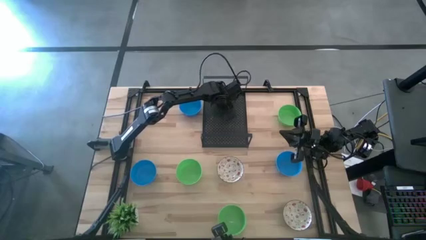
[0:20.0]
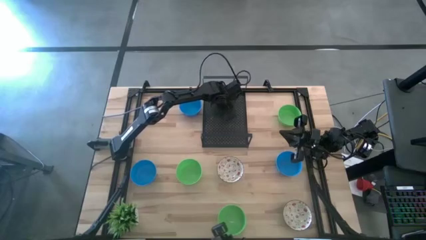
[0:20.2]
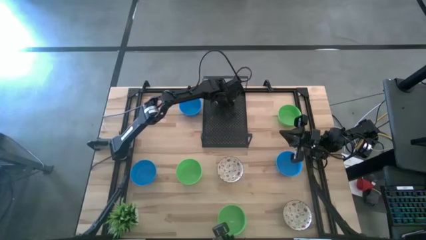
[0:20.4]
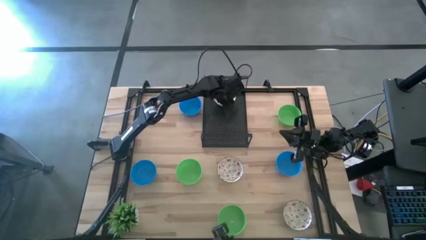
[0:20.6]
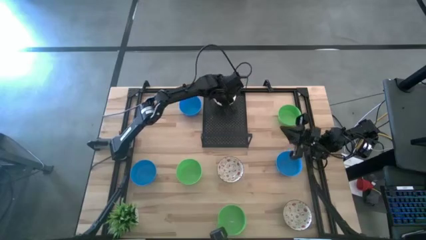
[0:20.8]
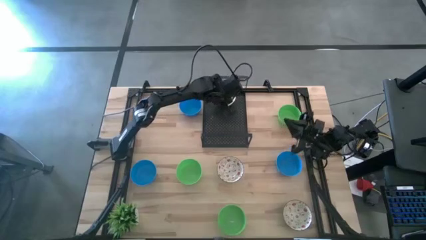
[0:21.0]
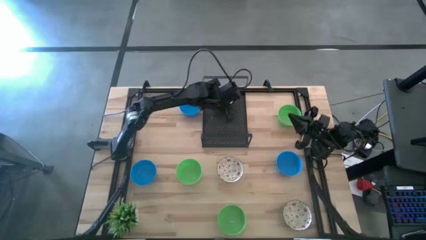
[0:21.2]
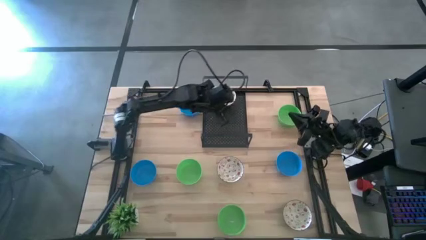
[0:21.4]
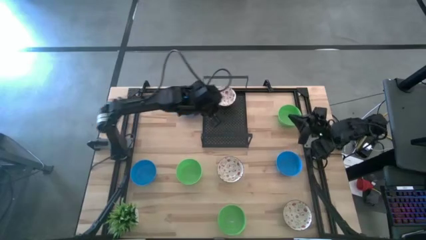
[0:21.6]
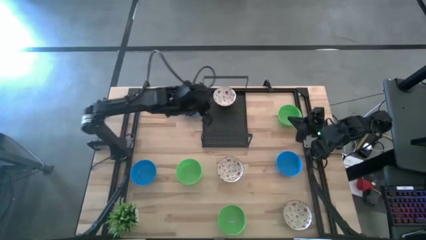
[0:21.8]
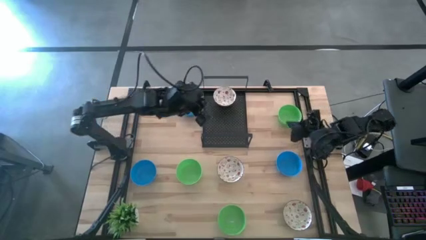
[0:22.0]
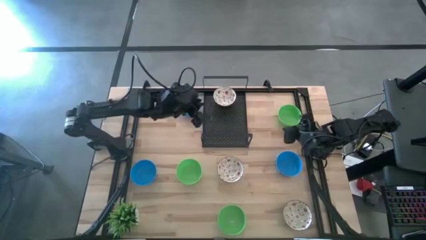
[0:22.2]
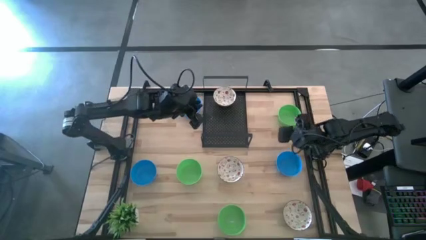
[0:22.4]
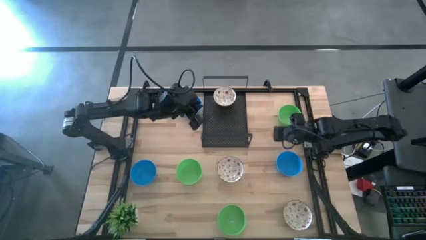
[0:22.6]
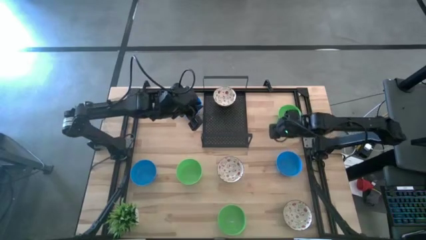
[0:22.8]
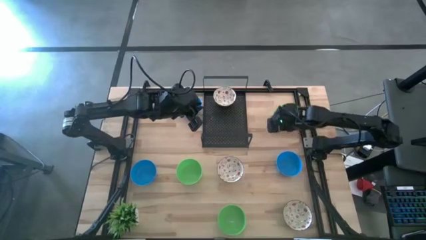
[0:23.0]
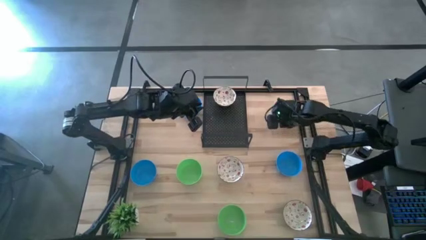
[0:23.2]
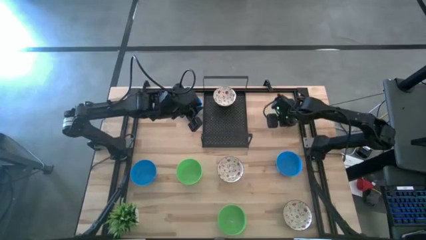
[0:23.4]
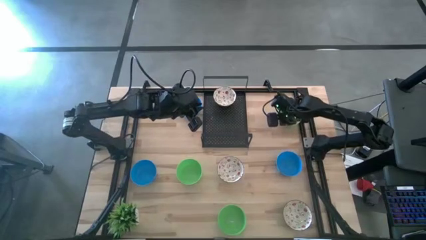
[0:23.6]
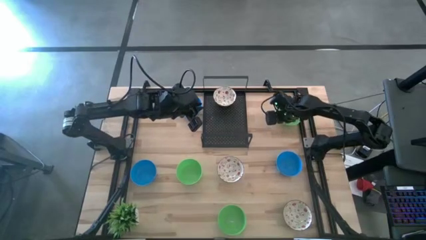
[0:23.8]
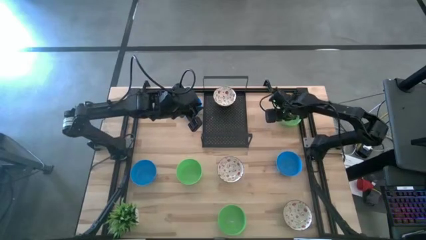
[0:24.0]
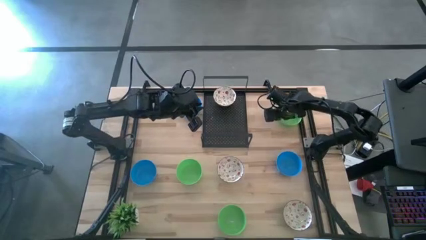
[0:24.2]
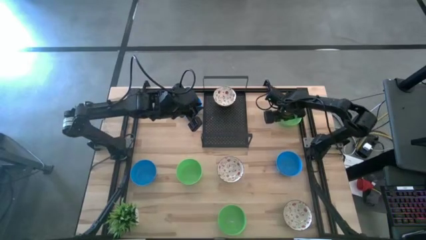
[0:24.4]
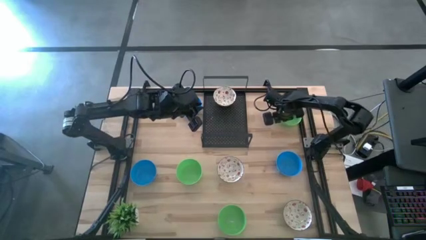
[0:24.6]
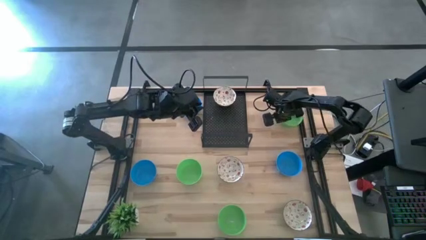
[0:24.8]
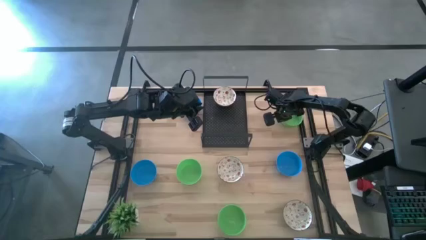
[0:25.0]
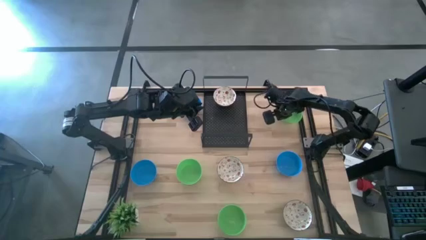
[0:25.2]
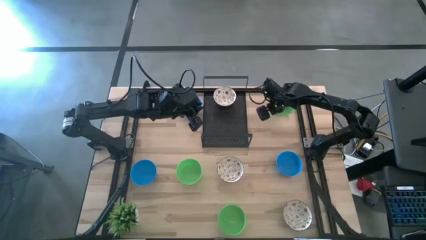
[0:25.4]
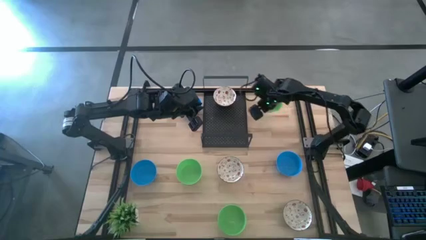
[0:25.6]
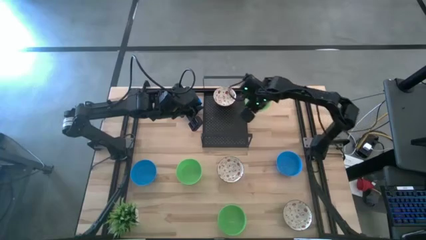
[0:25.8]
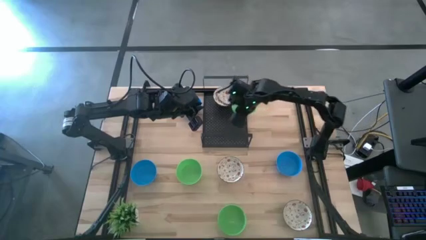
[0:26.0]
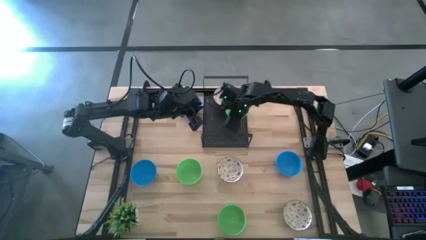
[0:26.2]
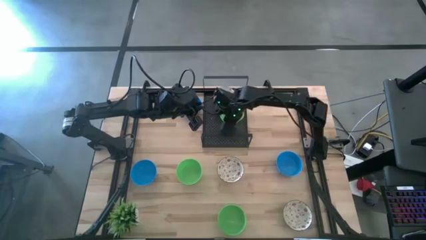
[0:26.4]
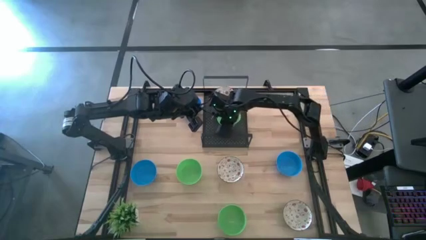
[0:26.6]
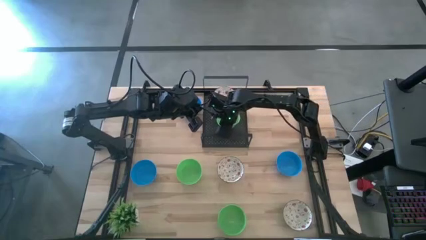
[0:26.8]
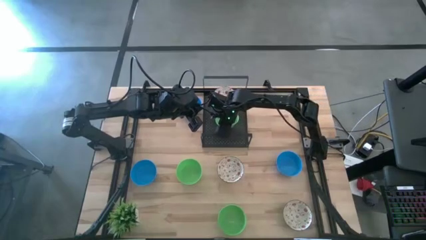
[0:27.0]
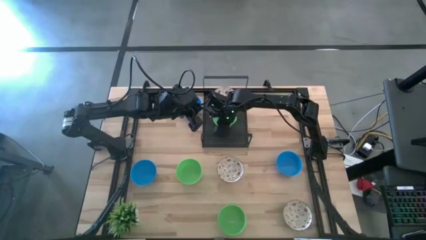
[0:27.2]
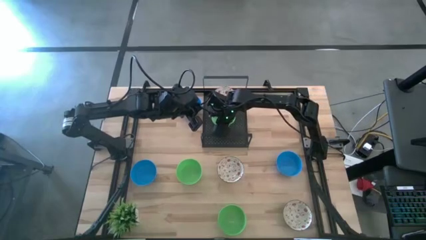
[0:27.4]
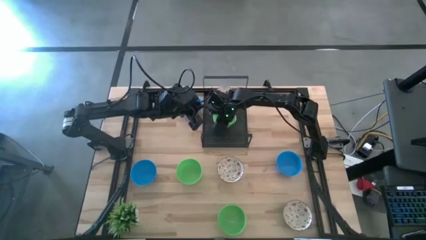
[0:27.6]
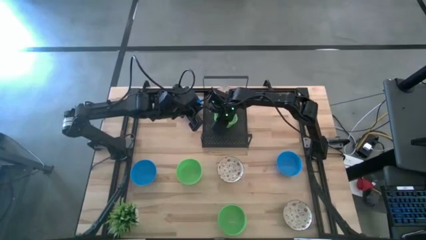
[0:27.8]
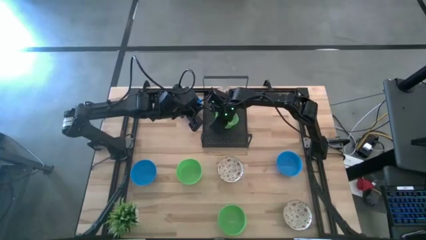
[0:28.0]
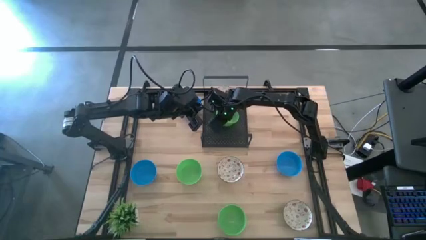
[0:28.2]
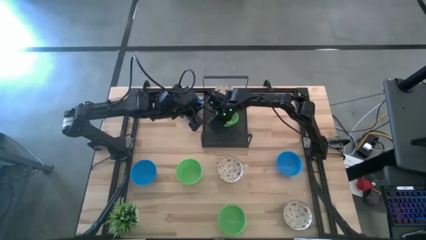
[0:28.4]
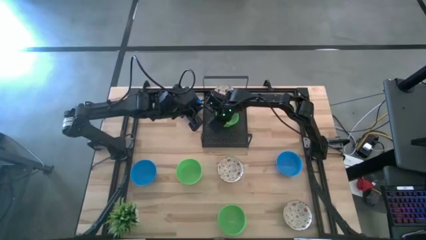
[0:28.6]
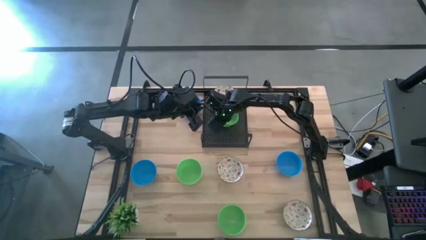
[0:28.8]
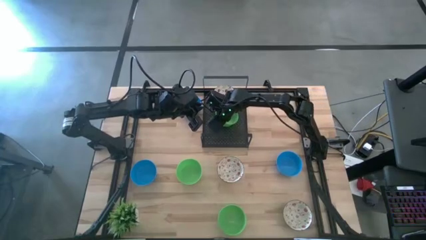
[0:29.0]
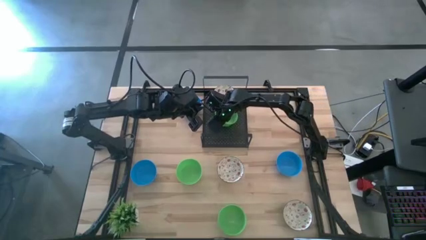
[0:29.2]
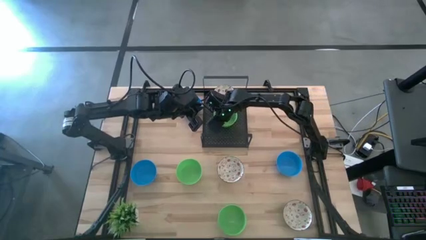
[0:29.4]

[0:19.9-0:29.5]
Task: Pick & Place Mini bowls
Put the top green bowl on the shelf
